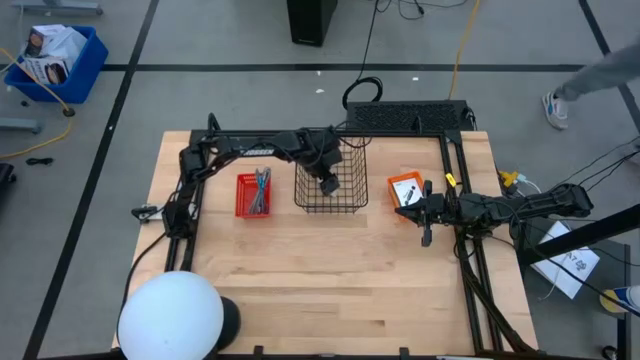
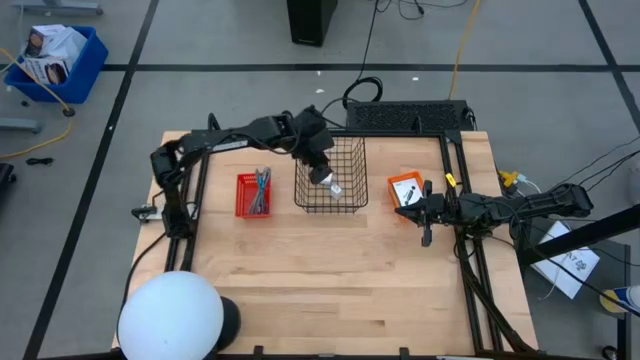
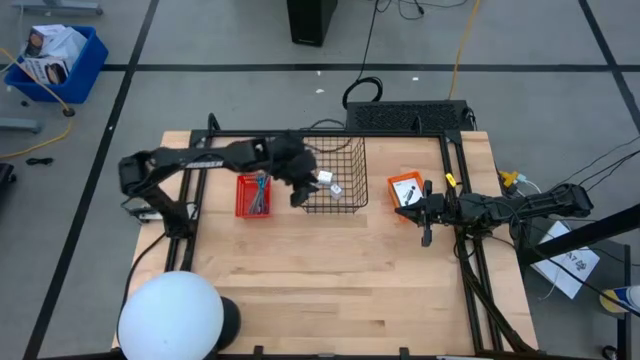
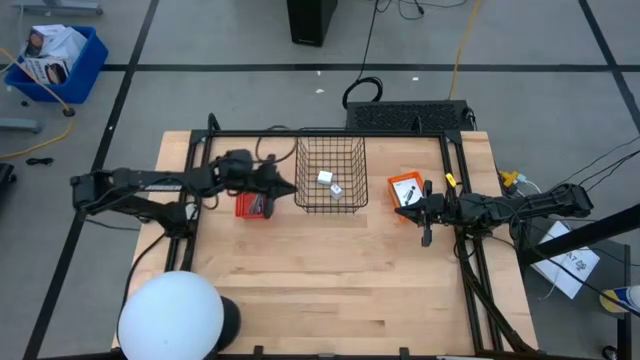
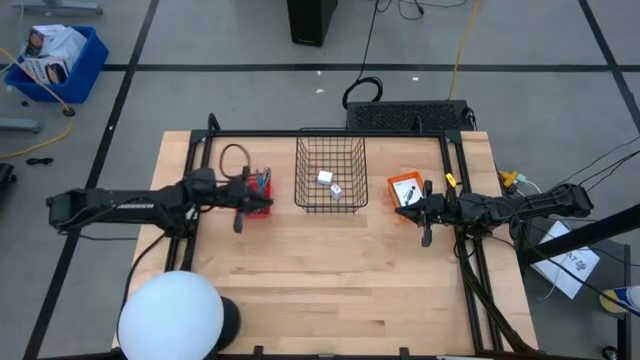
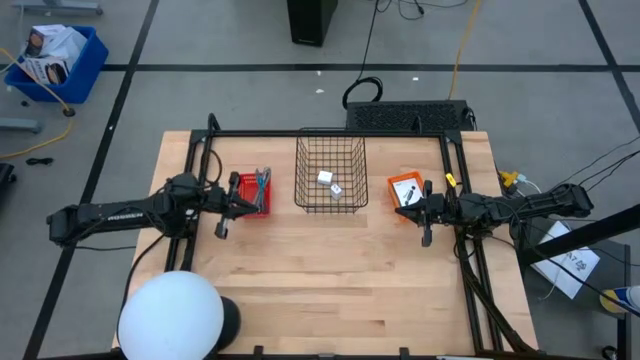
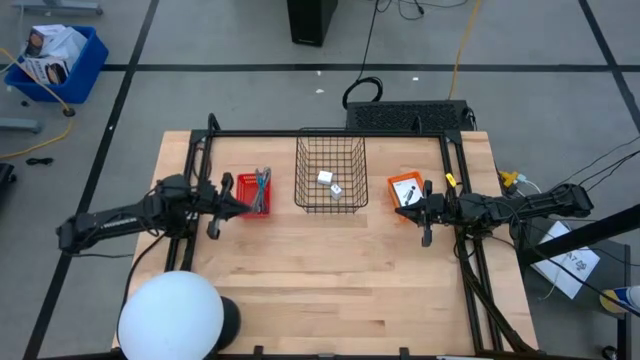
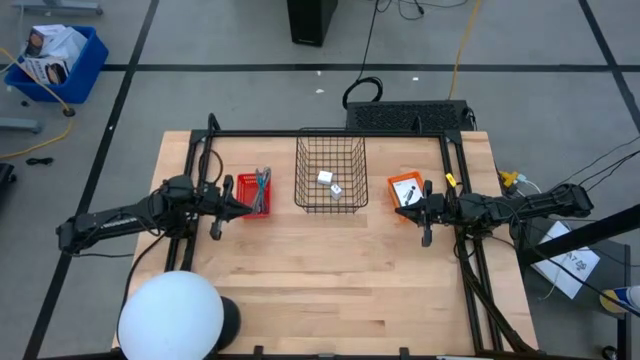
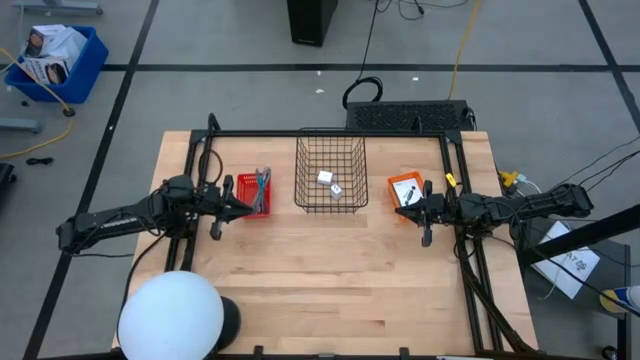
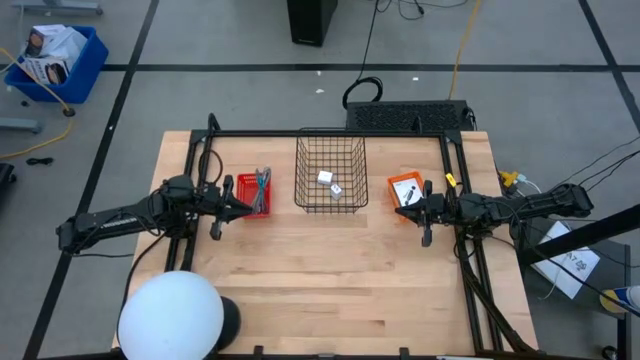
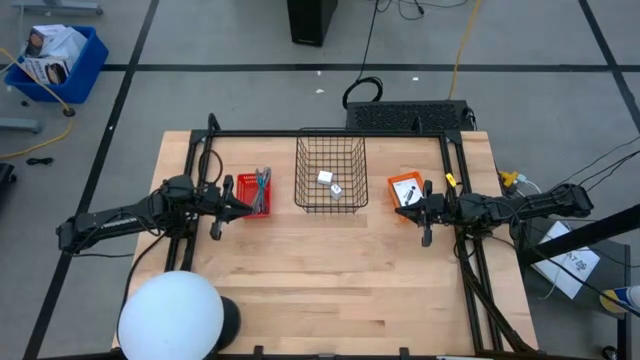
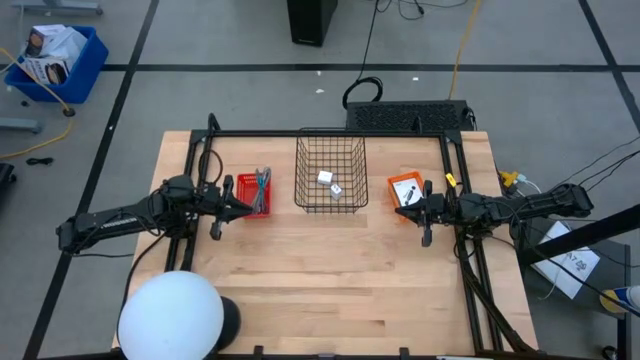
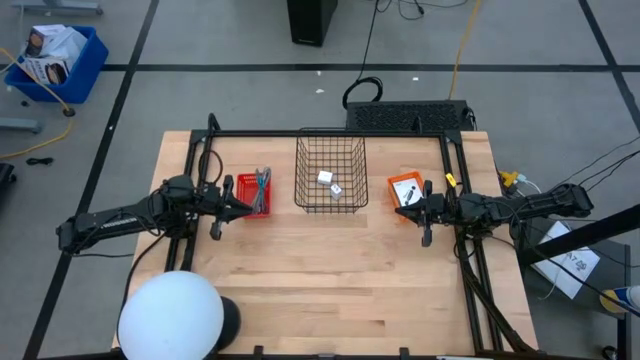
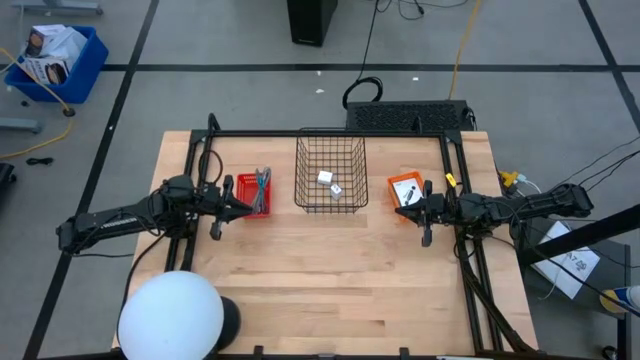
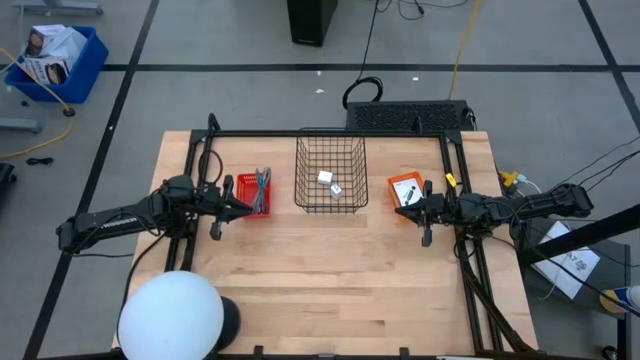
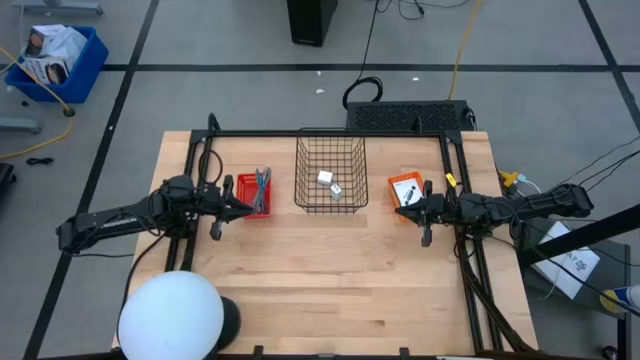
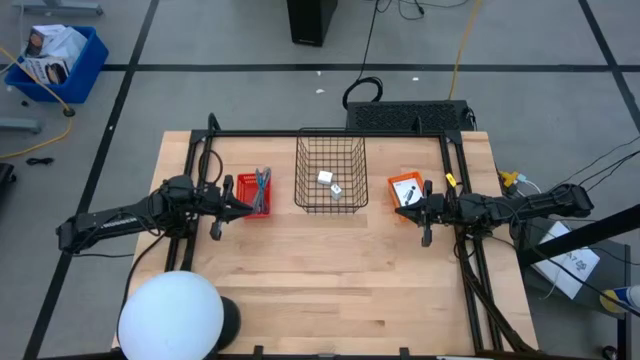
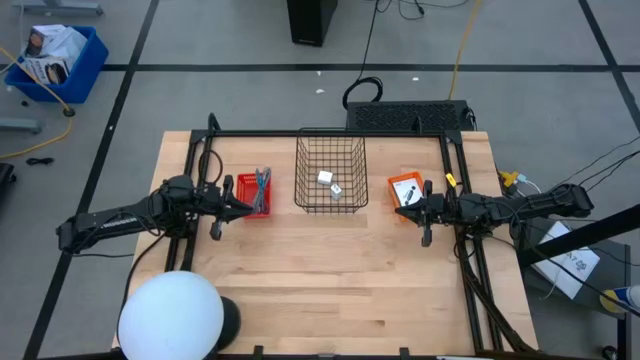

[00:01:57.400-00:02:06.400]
Task: Pick and place items into bin
Return to Home Position

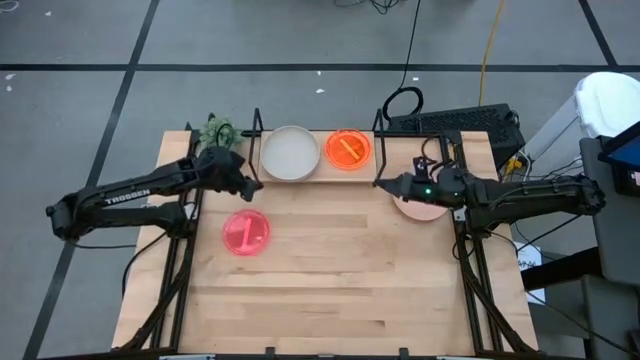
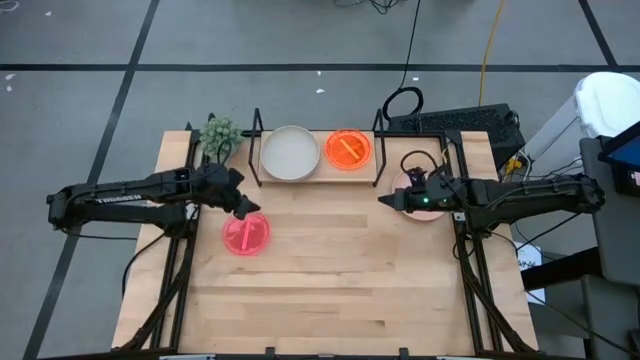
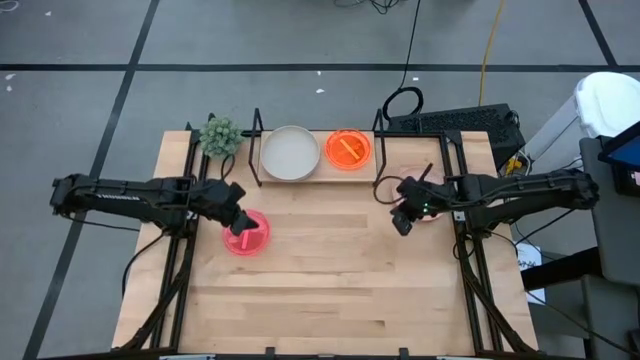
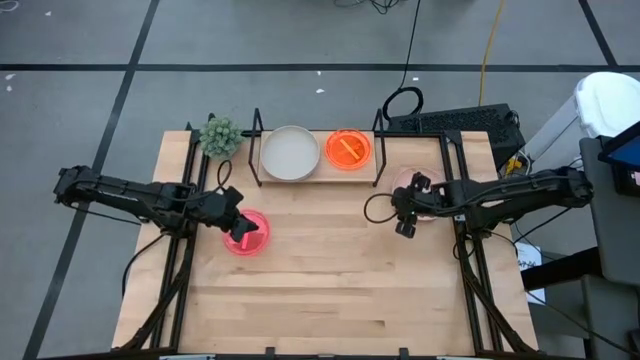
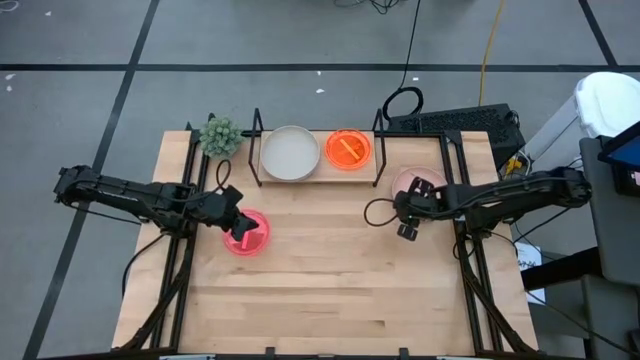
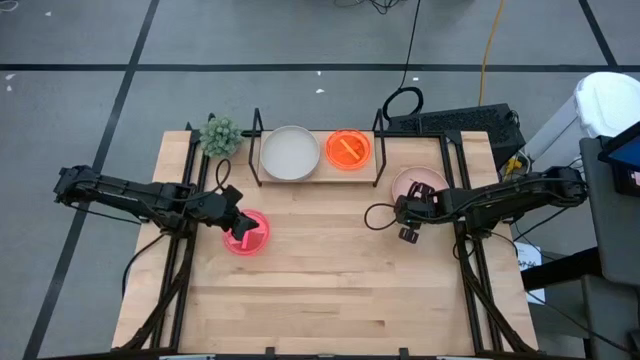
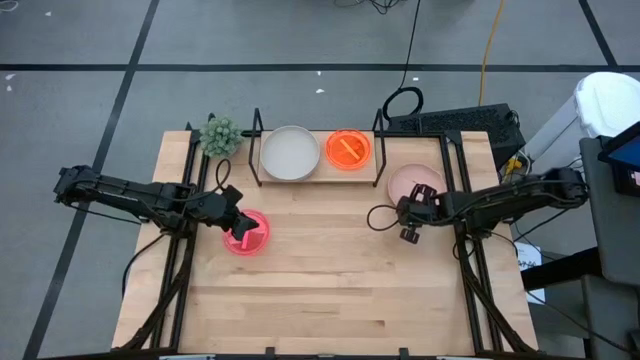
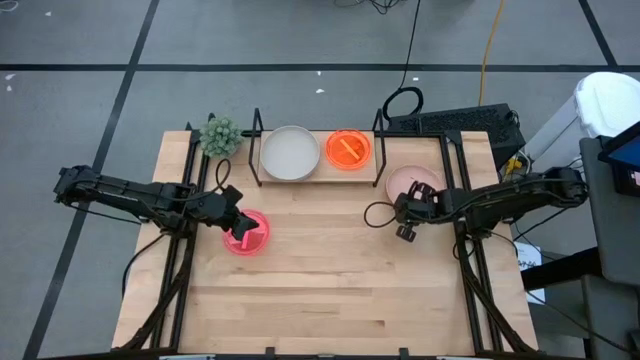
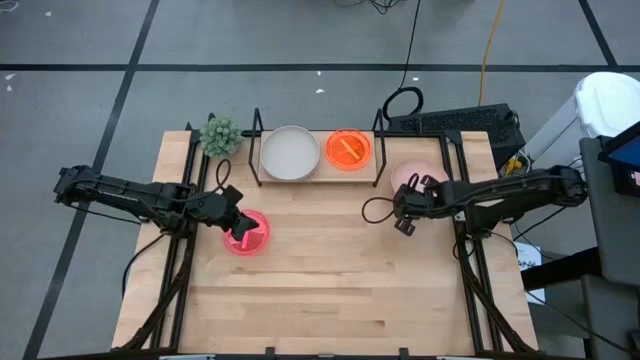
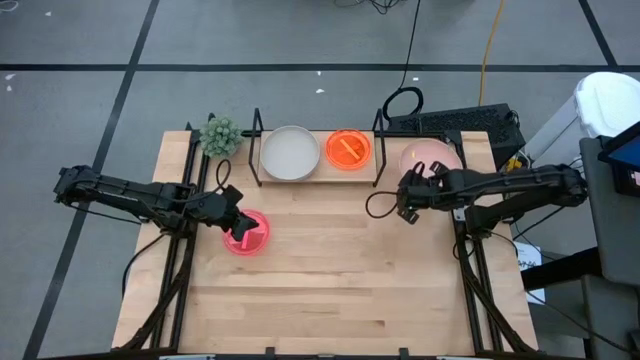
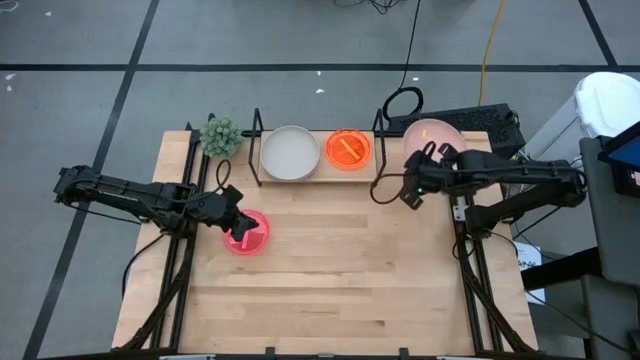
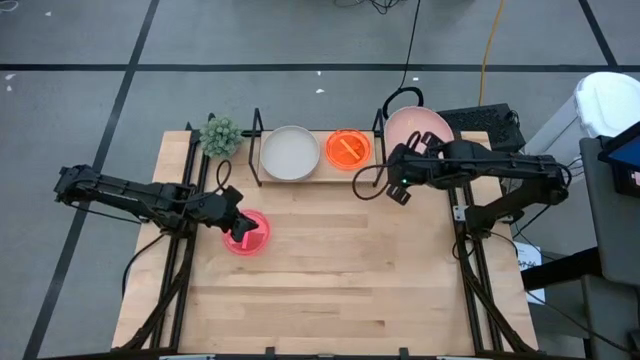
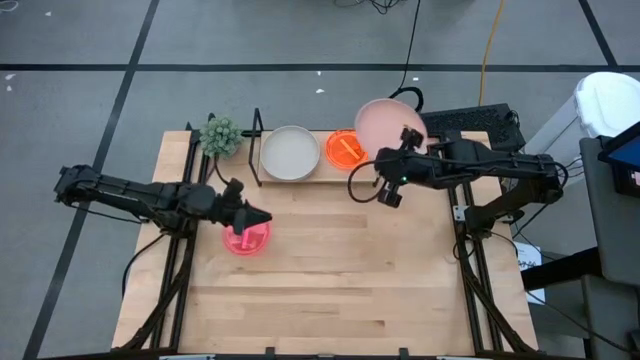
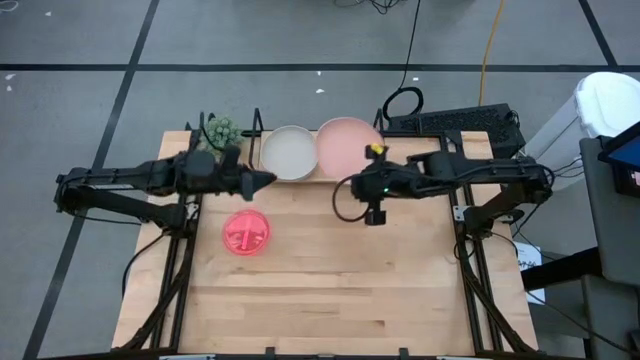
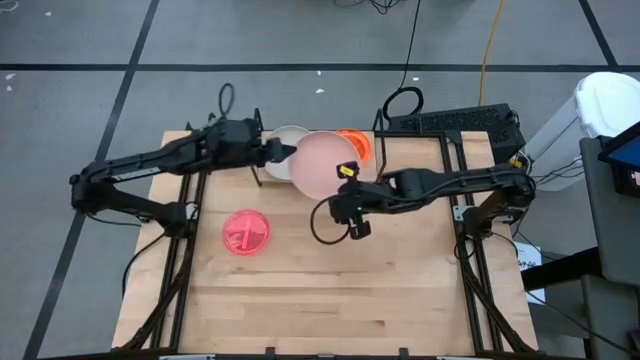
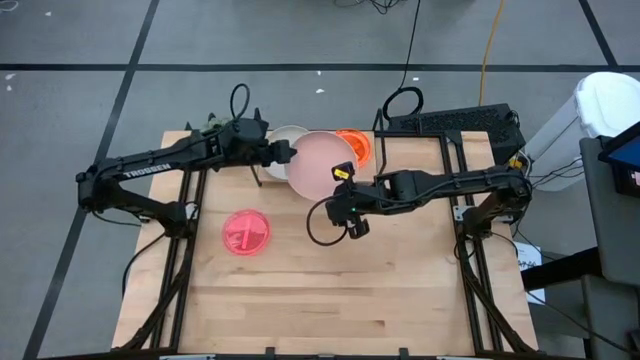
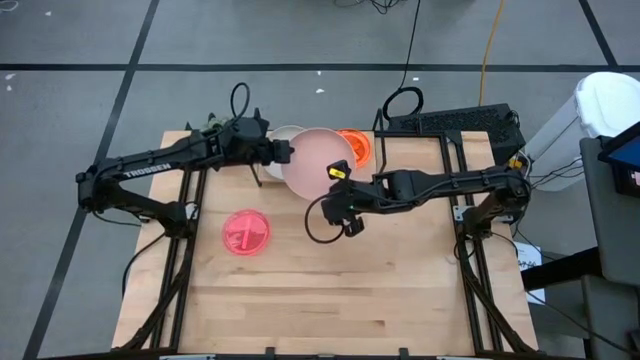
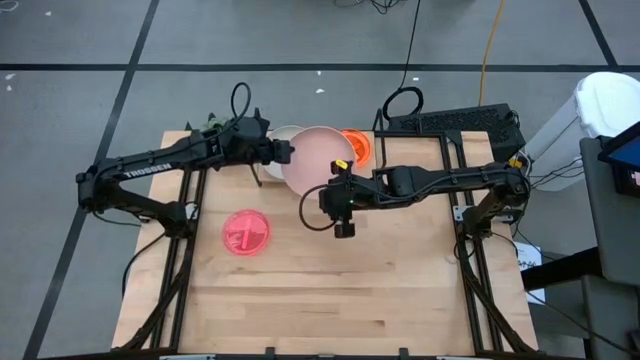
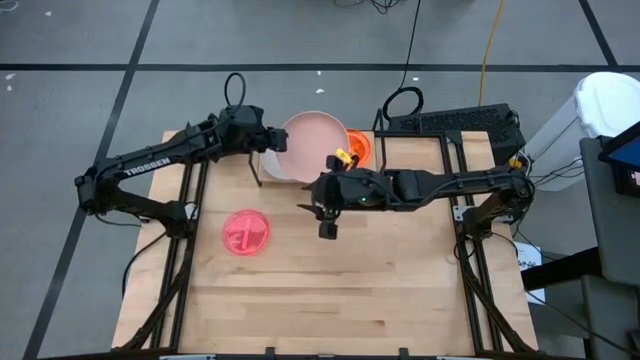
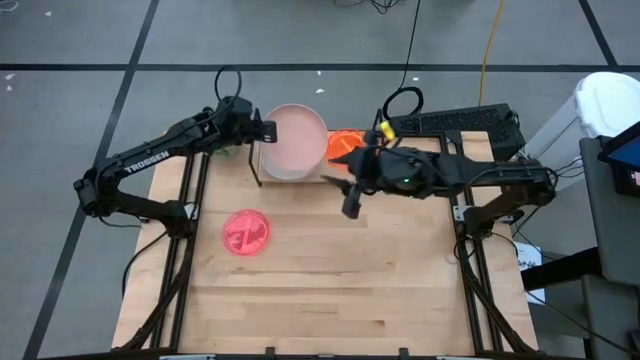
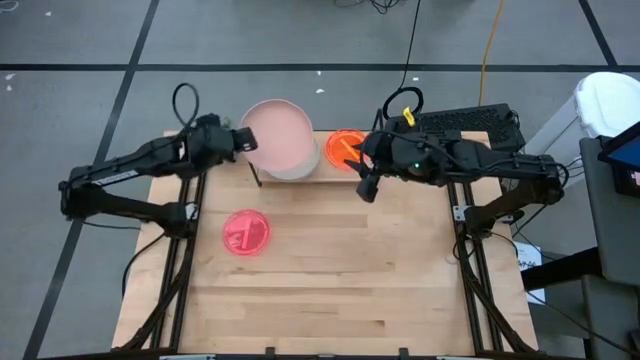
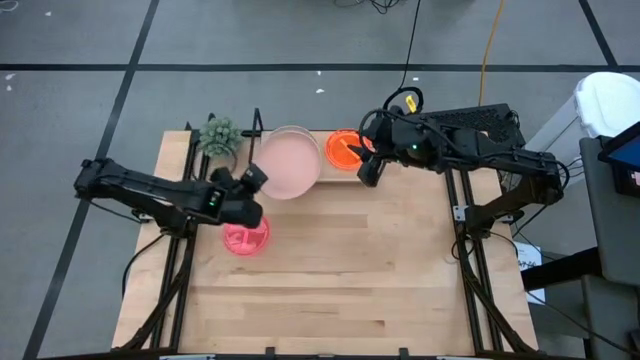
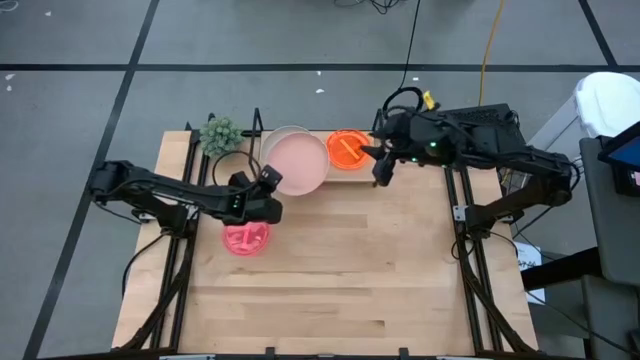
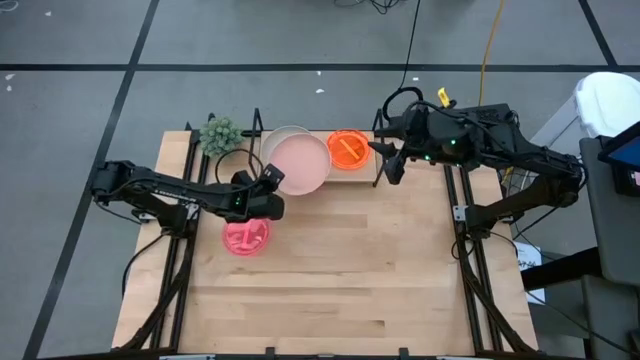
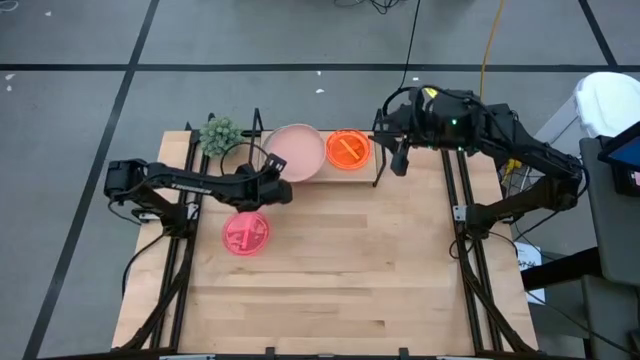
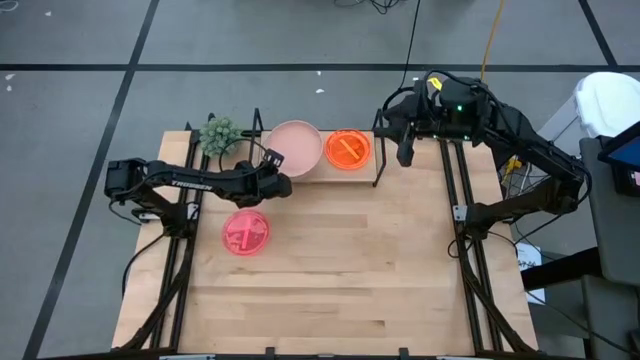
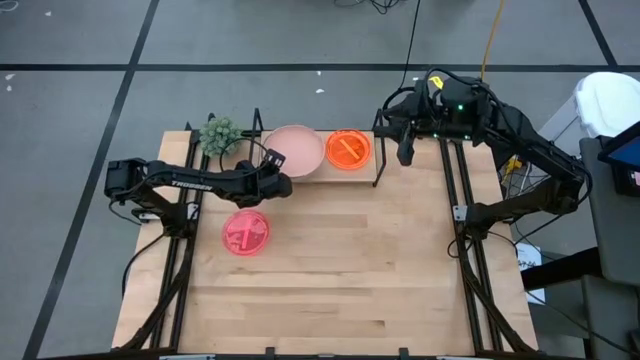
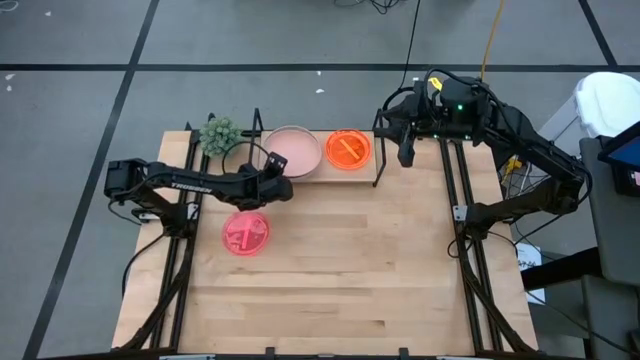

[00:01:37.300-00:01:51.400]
Task: Place and stack plates onto a shelf
Stack the pink plate on the gray plate on the shelf
